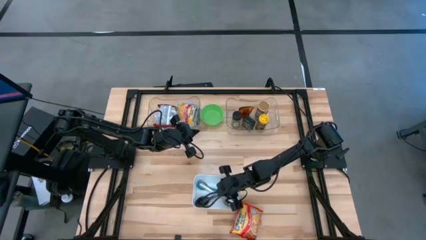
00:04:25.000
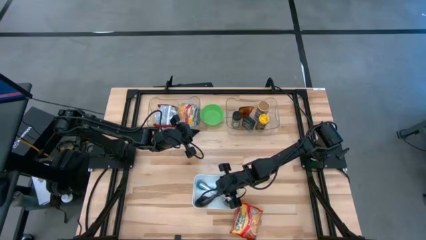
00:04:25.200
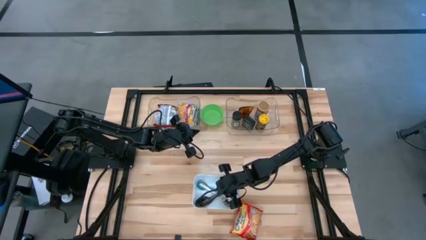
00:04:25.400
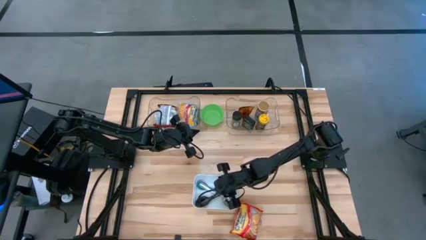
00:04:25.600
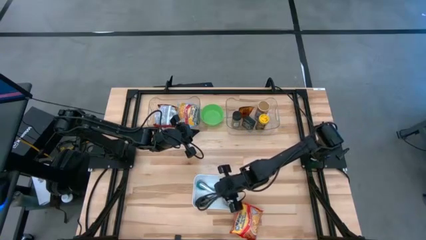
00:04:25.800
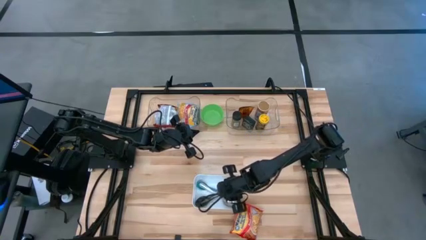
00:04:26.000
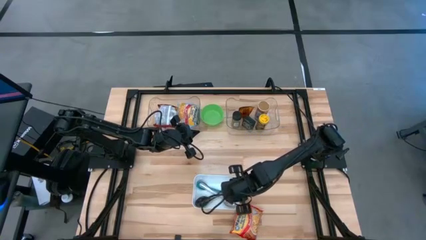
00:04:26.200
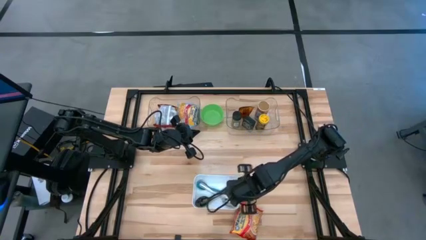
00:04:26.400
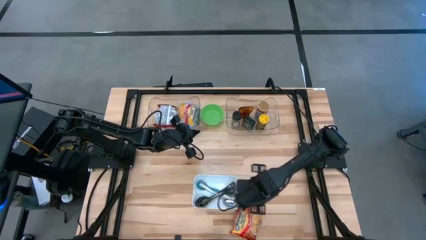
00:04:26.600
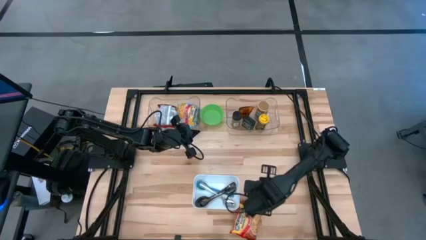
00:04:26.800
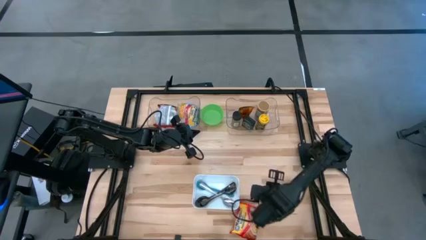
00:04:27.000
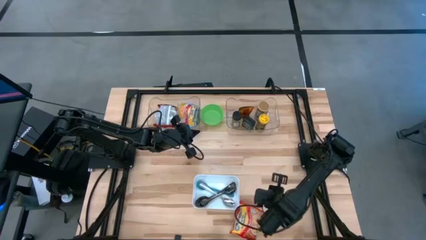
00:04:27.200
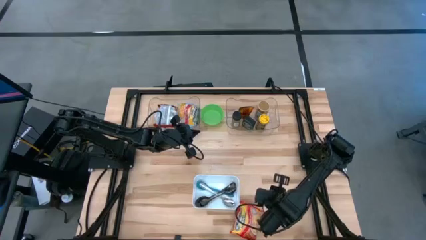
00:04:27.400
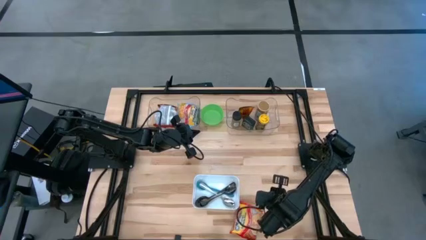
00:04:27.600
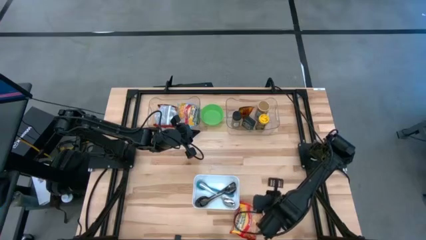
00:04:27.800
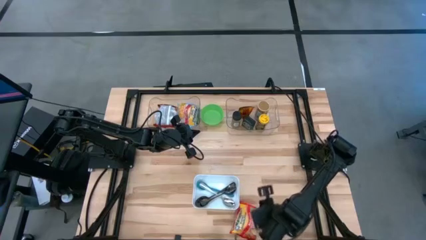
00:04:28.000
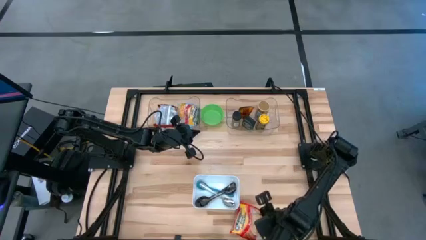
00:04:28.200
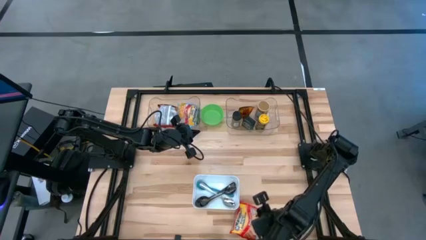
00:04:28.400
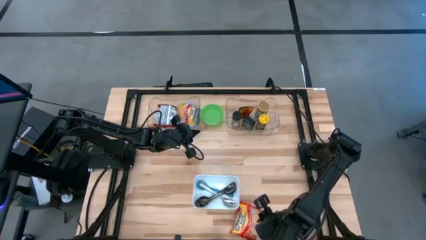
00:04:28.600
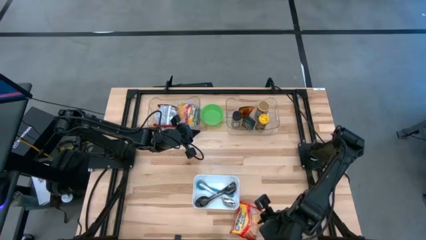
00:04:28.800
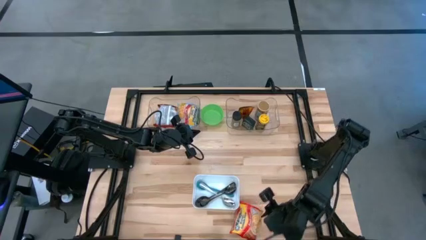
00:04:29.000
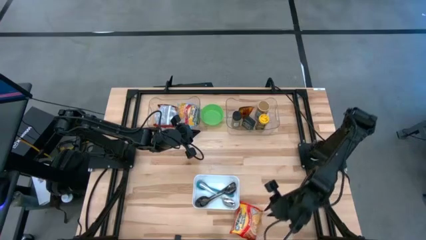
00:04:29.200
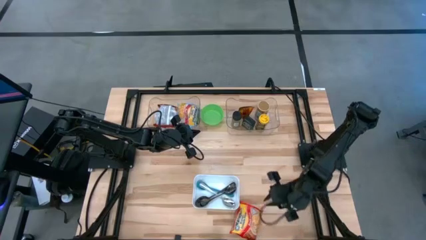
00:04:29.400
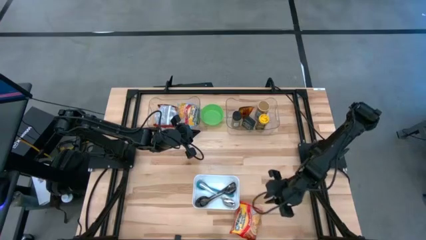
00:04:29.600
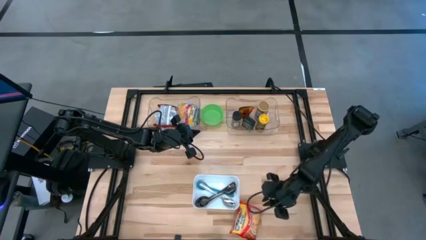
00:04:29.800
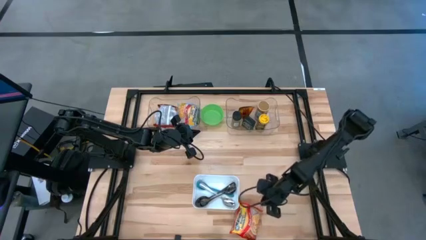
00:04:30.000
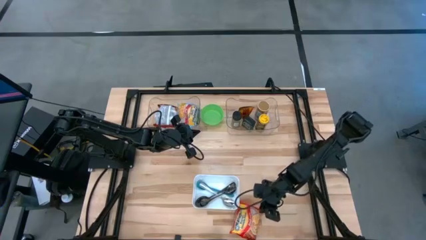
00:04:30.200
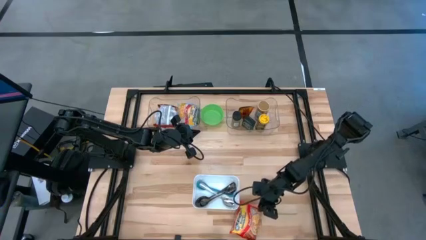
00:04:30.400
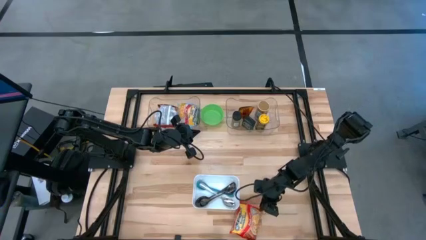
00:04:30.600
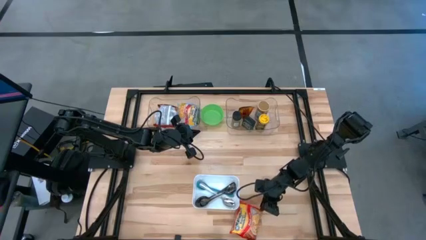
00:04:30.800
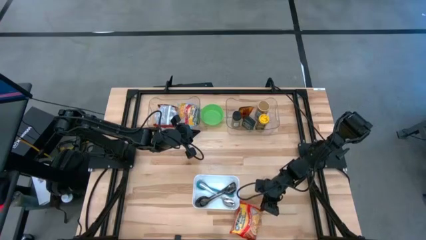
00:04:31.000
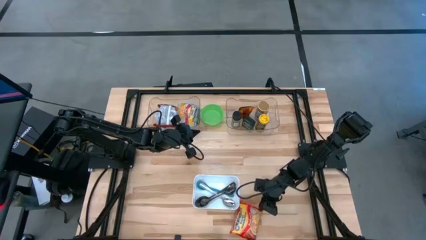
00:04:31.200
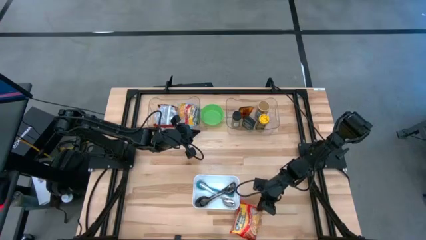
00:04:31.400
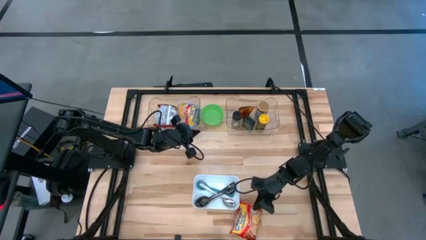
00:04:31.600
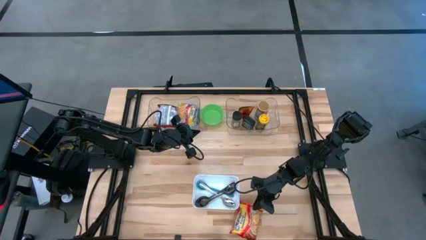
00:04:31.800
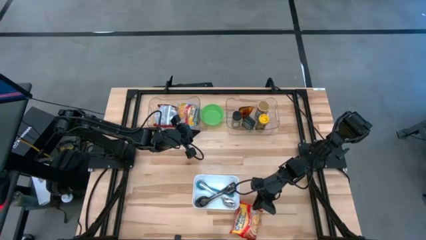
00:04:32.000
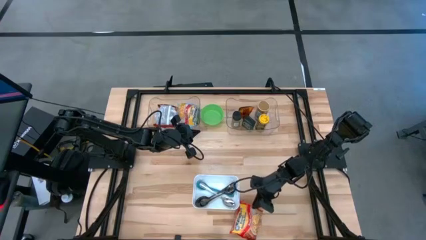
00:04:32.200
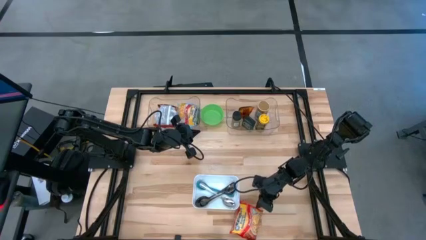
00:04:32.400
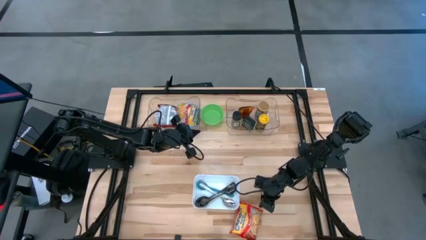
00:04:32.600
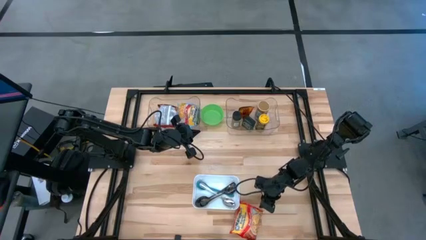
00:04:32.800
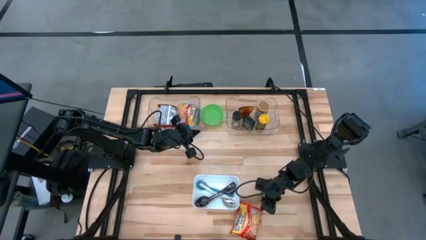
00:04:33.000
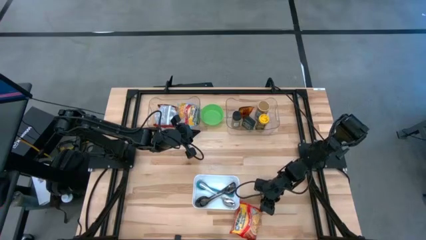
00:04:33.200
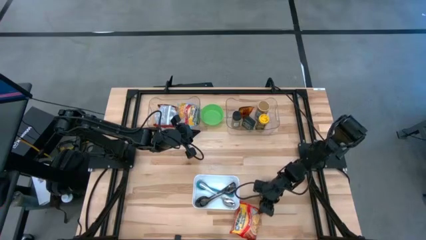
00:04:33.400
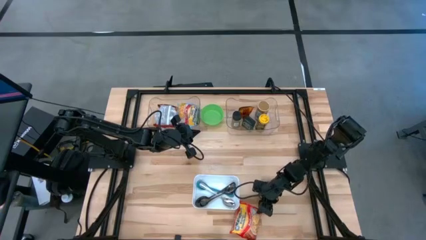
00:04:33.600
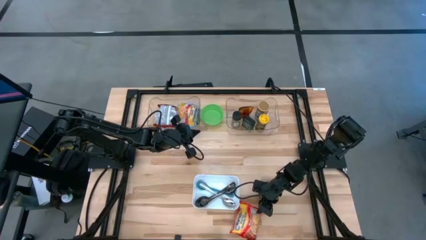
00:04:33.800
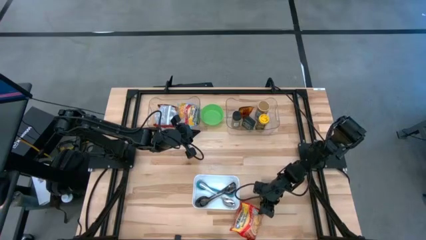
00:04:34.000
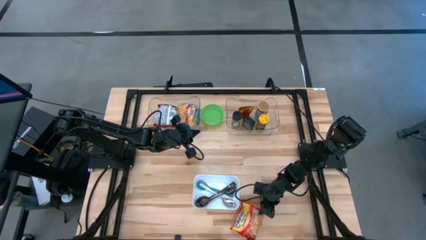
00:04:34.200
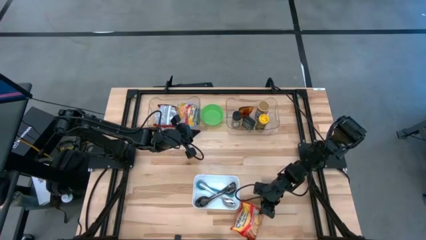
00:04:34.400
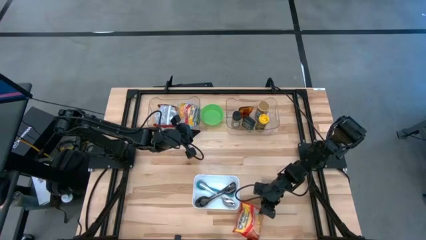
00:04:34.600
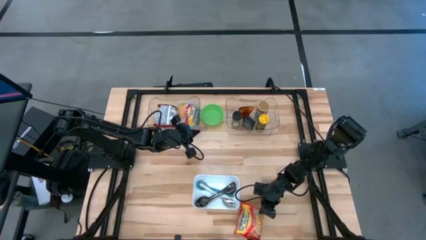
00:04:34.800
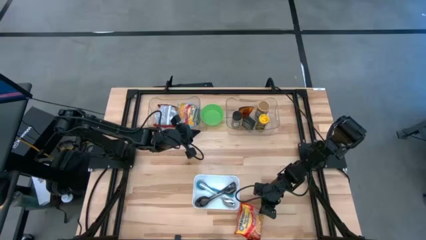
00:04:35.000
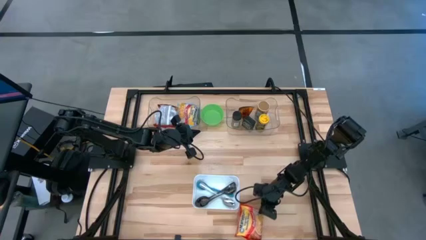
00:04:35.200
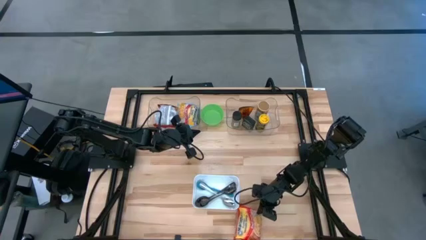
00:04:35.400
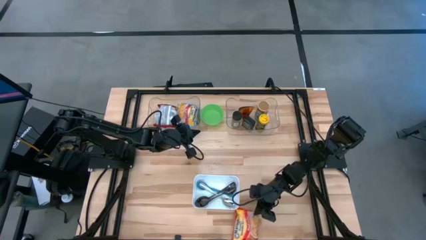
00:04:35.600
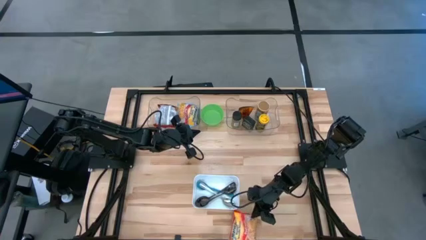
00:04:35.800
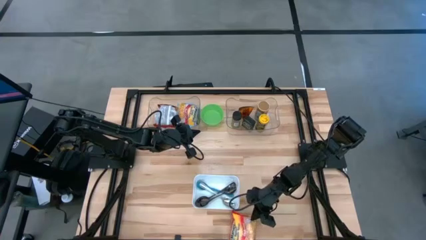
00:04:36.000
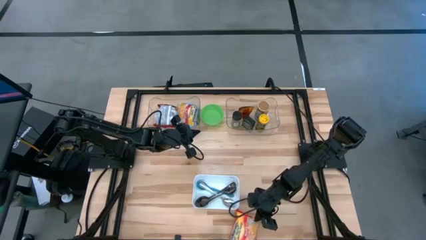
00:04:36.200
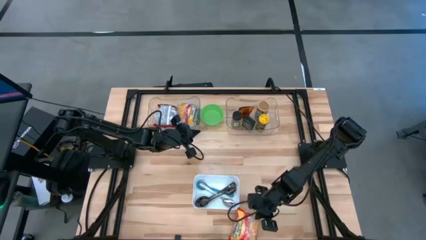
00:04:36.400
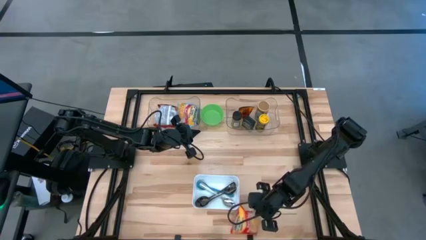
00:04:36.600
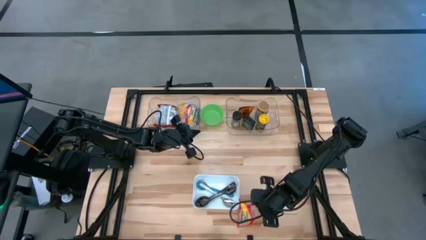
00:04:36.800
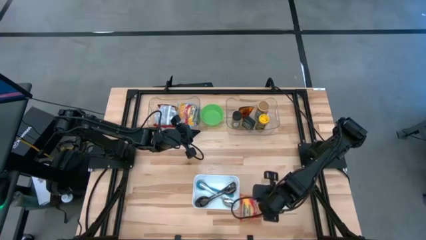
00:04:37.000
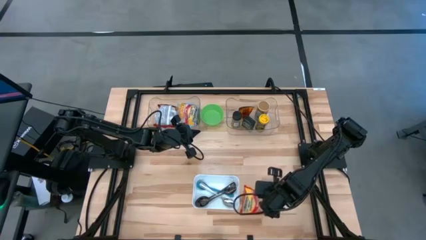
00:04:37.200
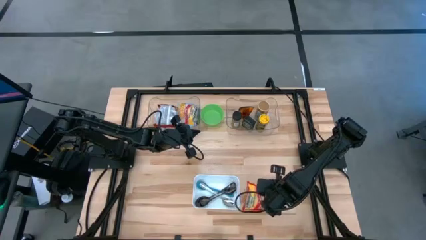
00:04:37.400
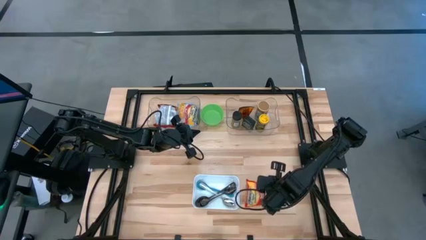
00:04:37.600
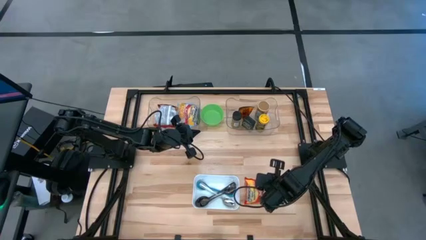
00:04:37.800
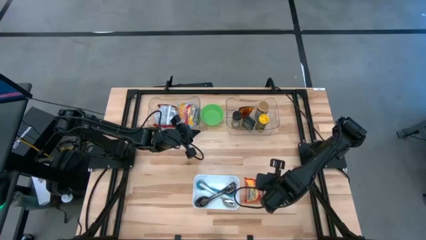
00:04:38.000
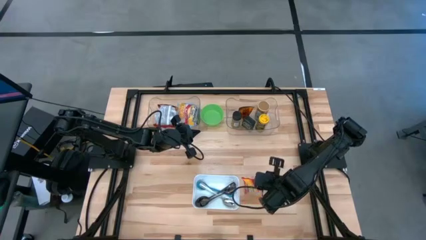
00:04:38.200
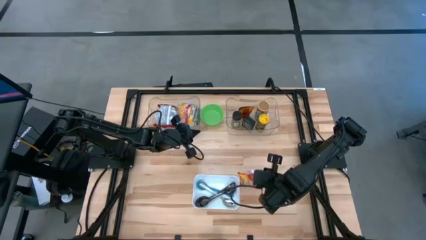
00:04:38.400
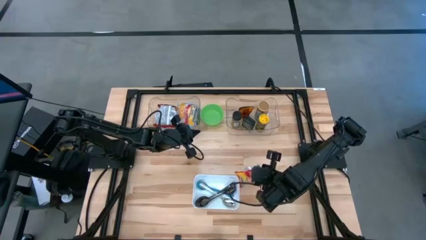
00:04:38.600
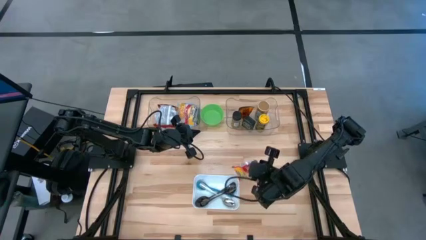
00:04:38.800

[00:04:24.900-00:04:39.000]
Task: Pick & Place Food Item
Put the orange noodle pack into the left transparent bin
